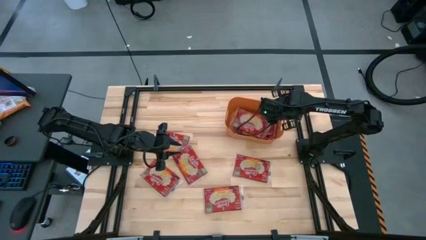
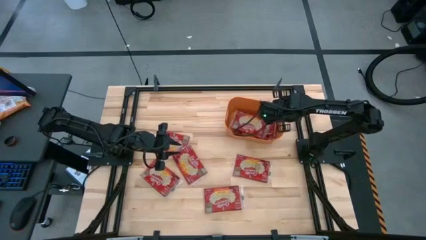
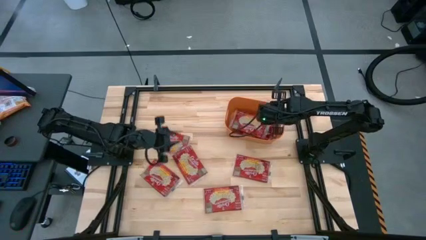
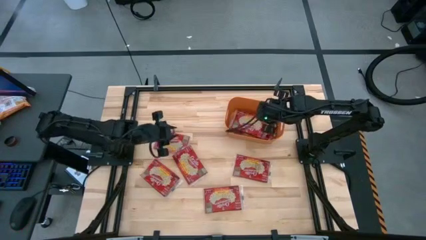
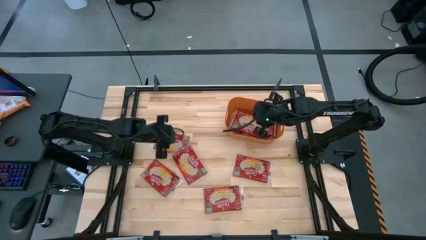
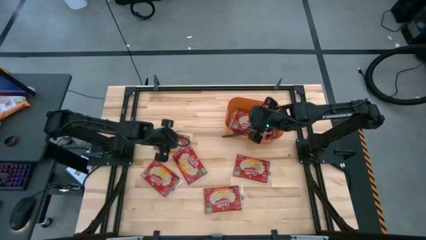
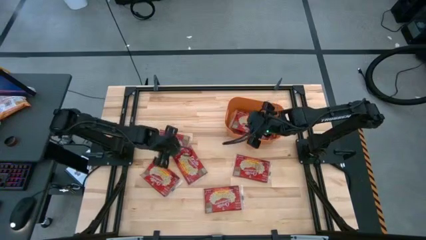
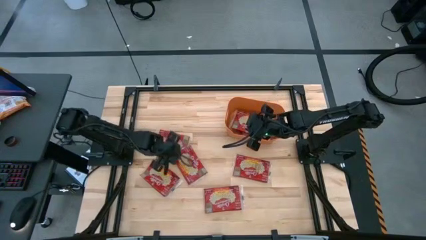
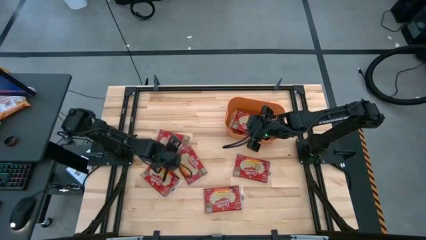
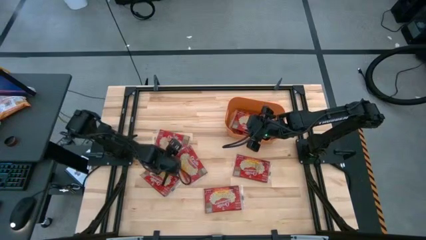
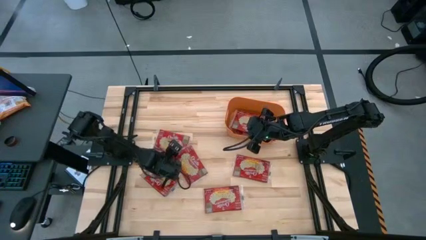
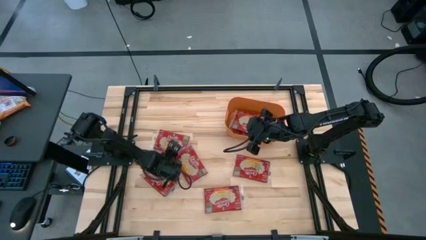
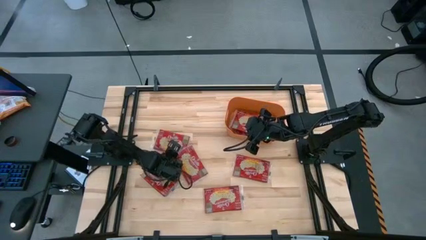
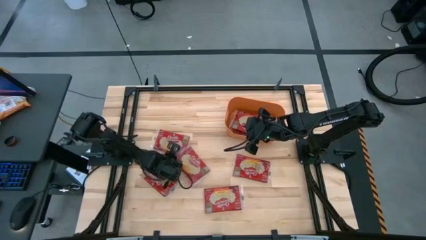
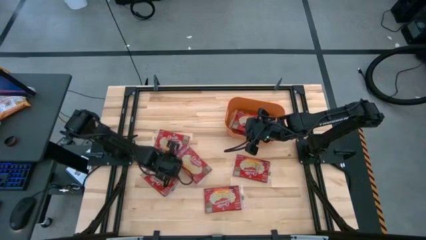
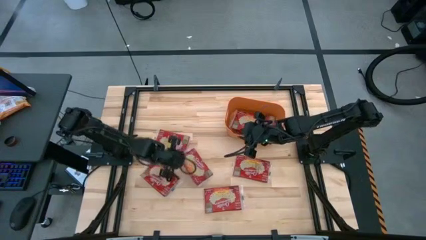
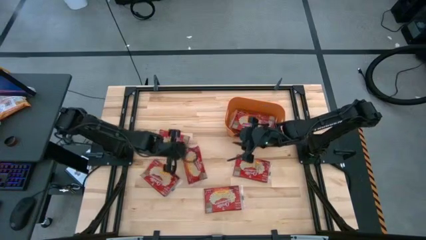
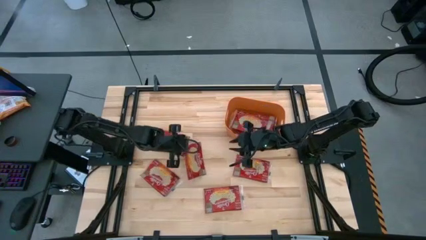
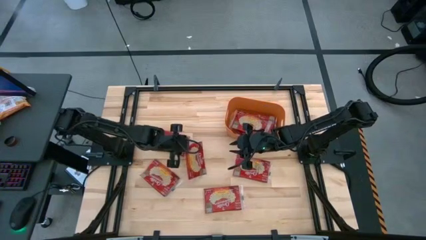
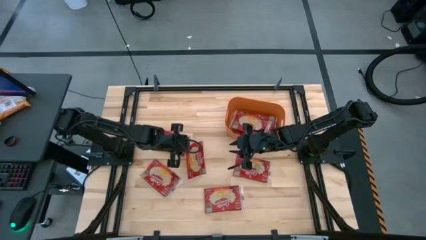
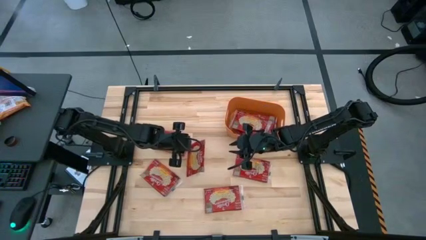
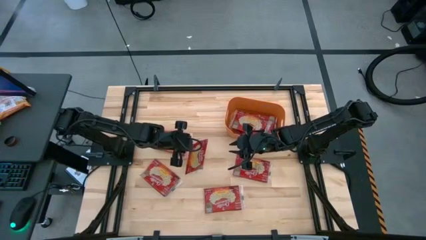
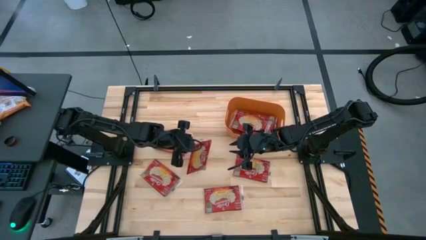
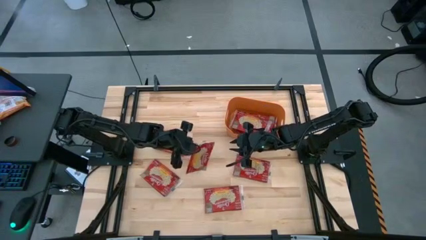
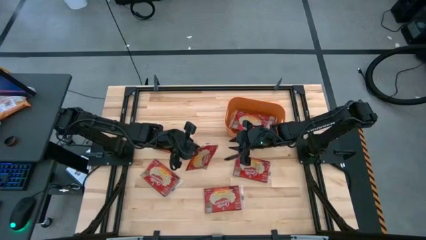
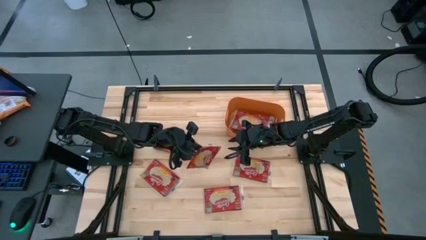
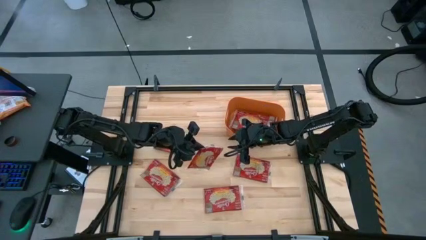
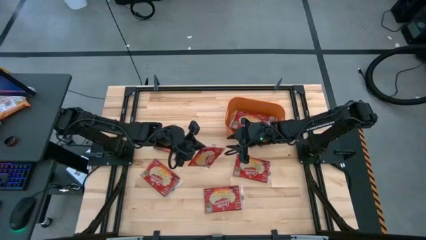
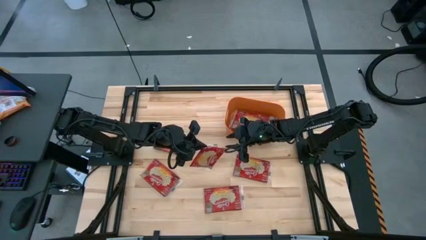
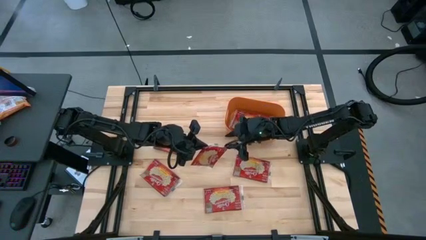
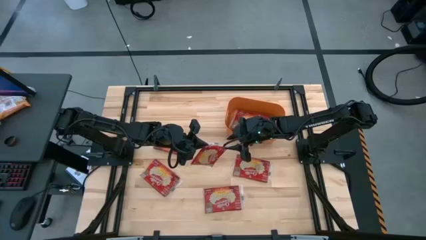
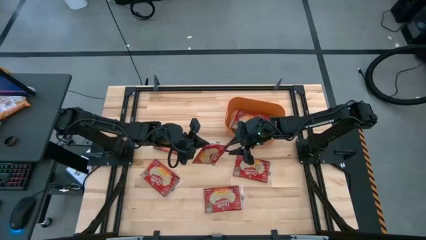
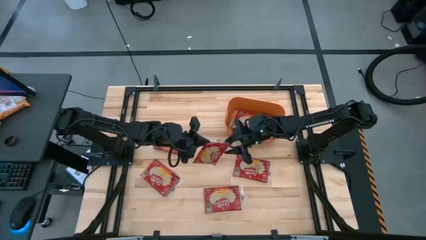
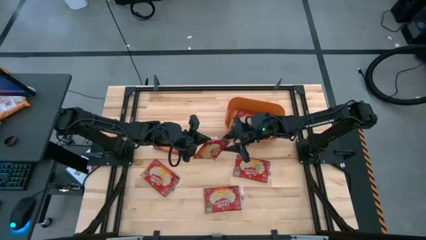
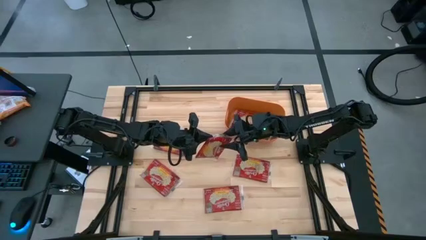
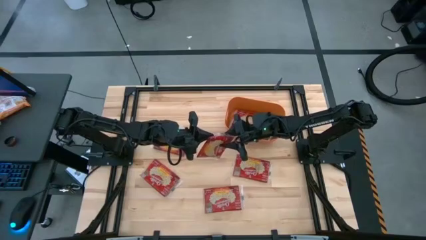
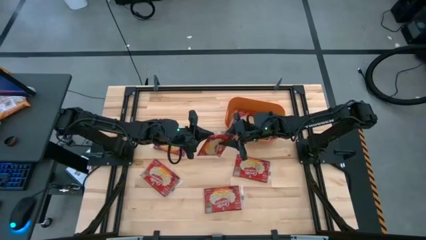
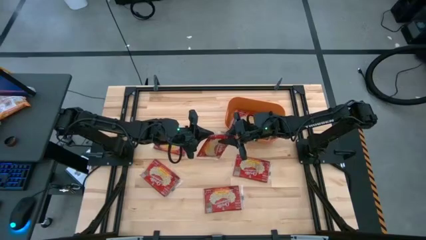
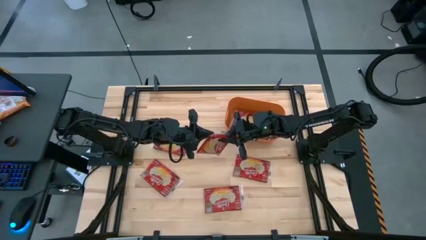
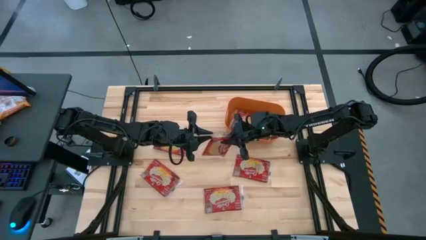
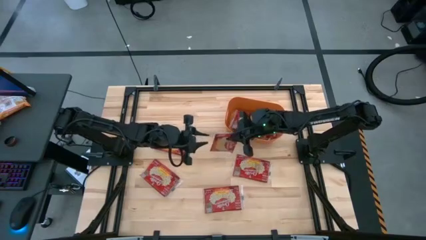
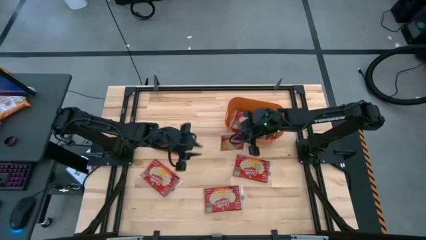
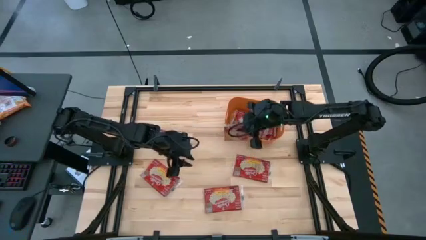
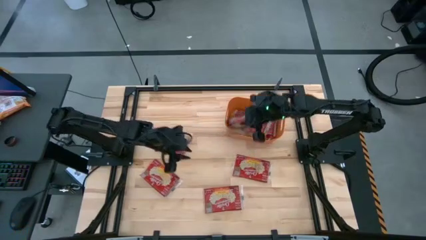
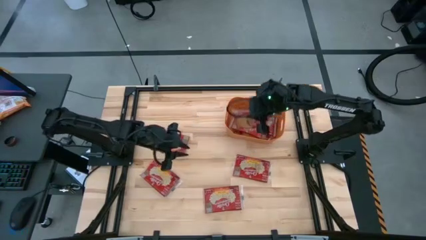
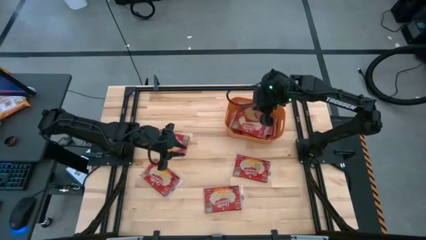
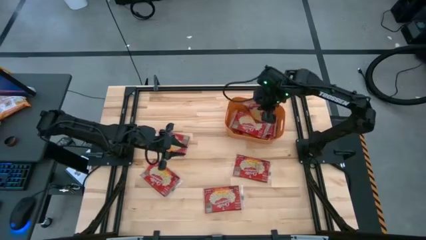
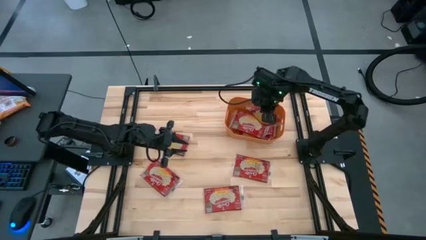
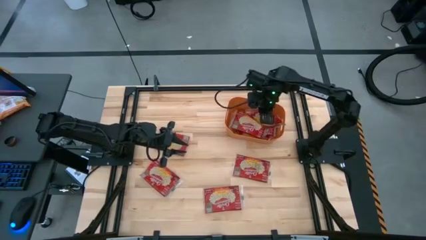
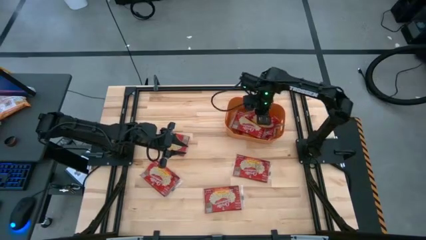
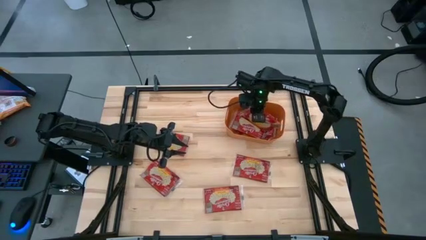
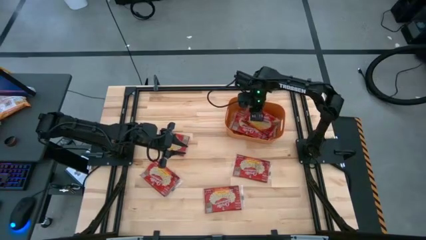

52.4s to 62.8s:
Task: Sort popcorn bags into baskets
Put the popcorn bag into the orange bin

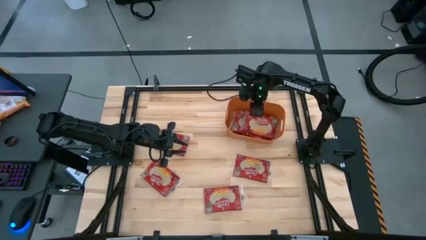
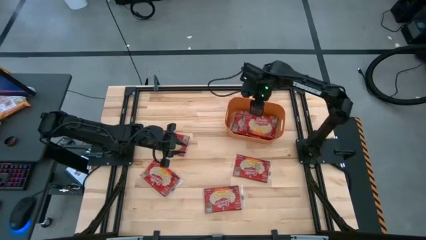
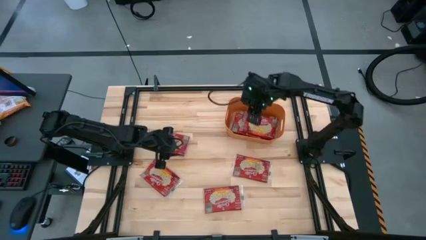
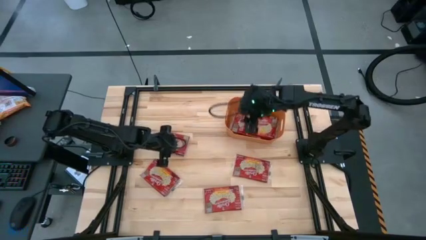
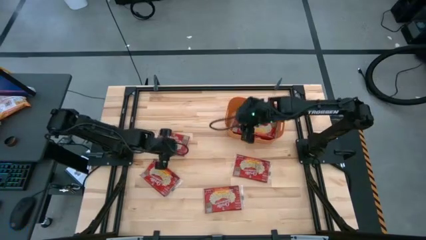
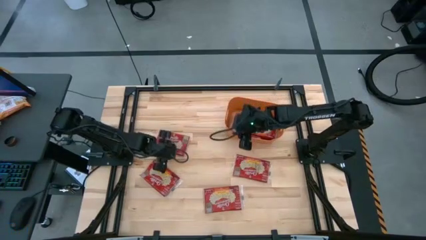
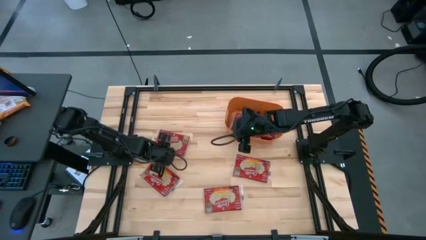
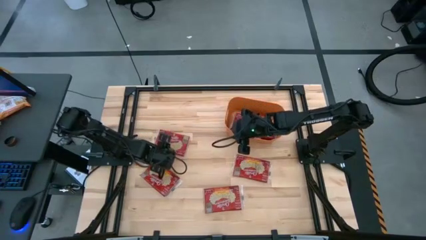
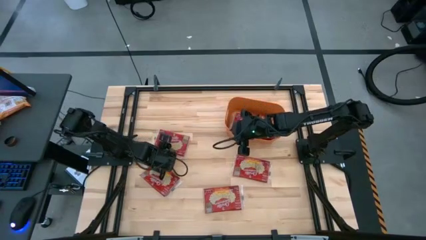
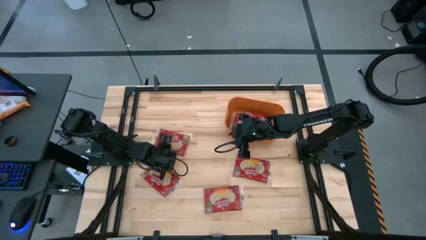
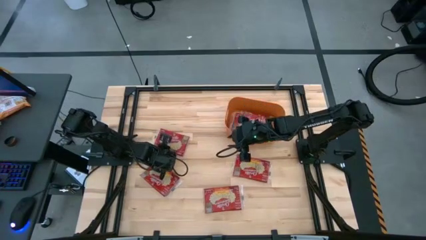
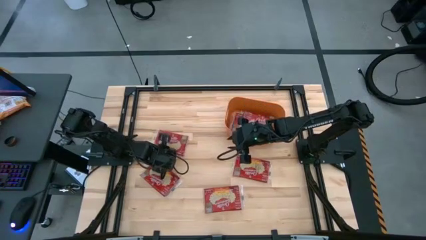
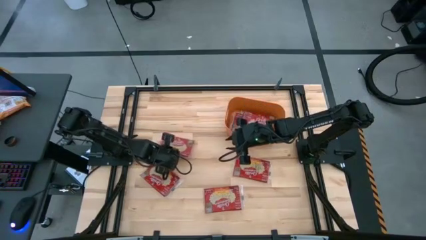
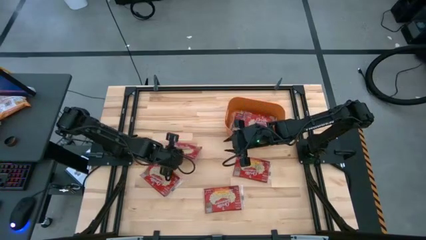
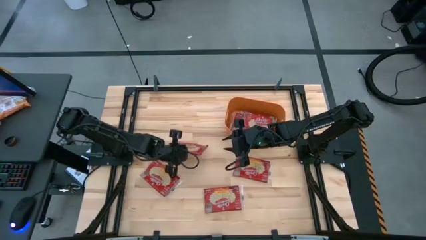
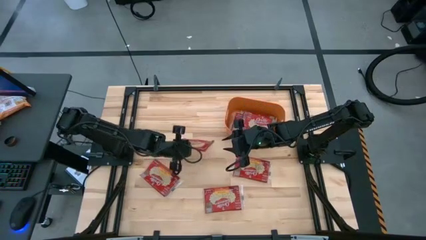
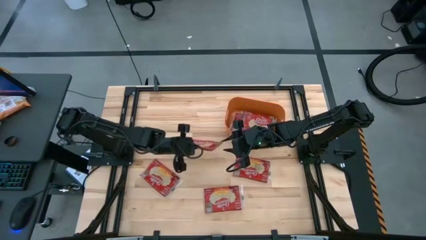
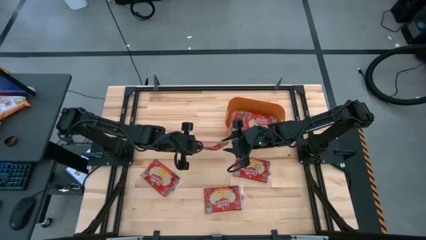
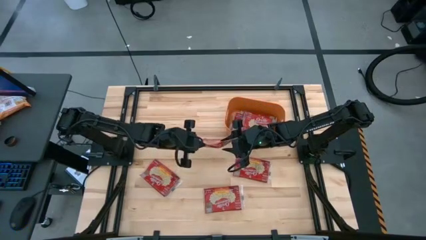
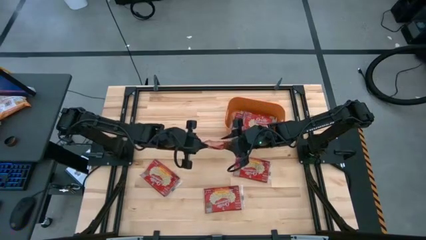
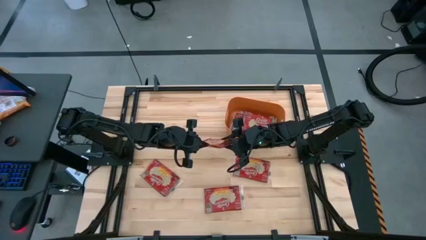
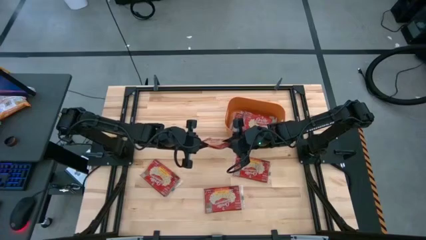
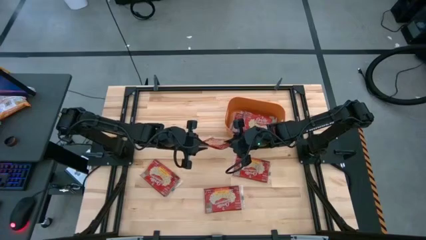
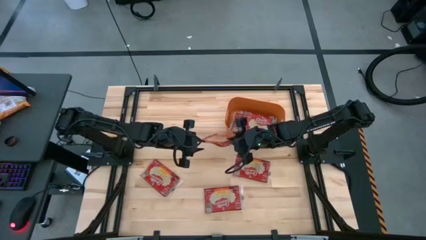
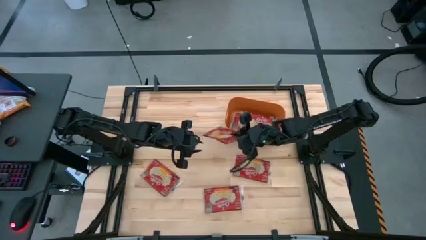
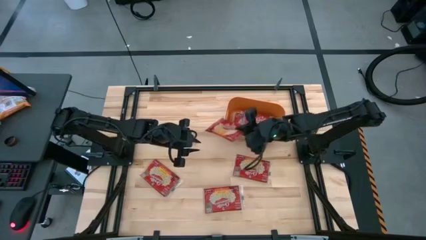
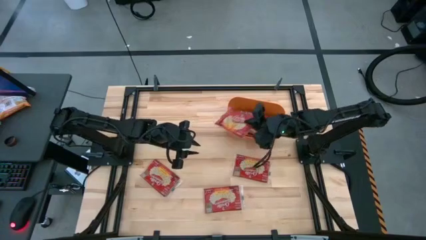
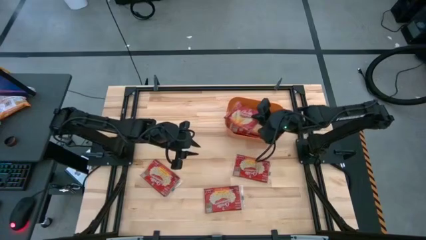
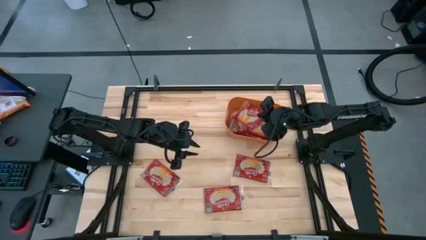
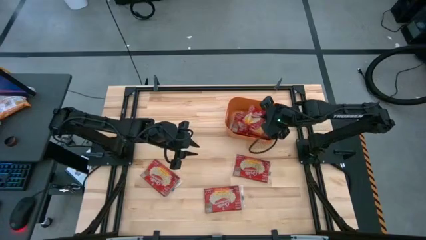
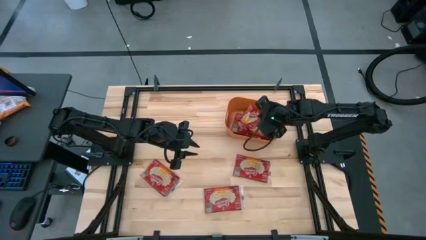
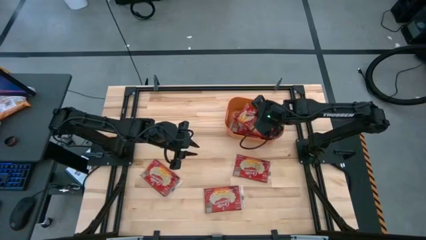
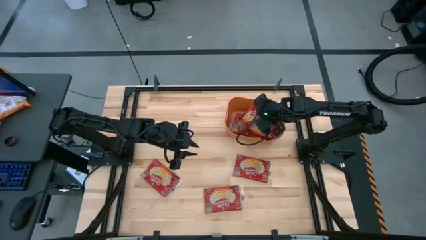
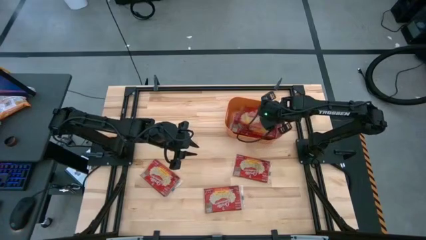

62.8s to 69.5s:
Put the popcorn bag into the orange bin
